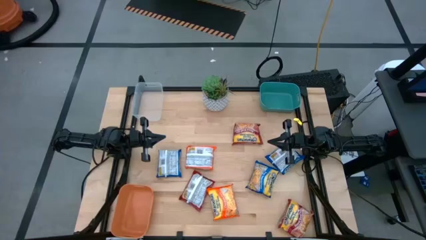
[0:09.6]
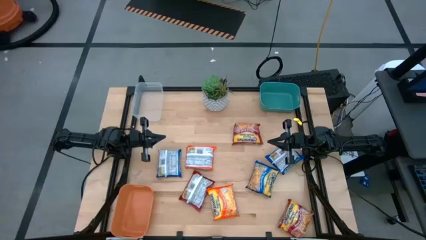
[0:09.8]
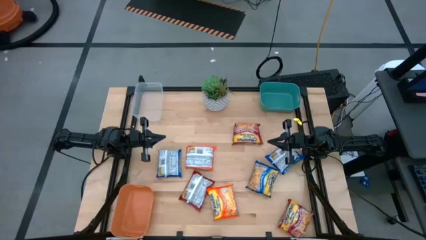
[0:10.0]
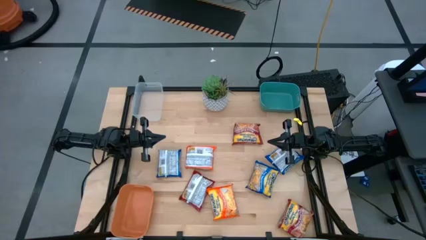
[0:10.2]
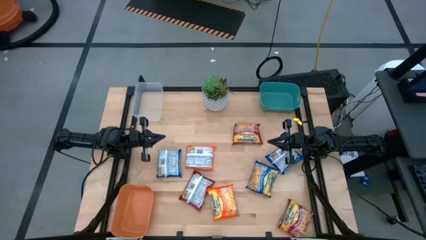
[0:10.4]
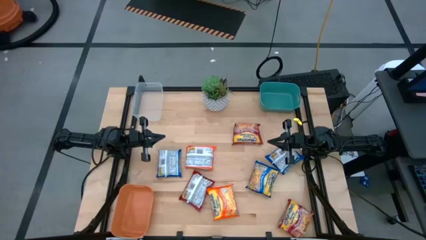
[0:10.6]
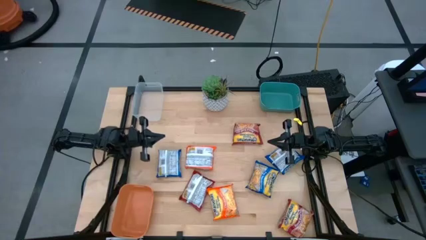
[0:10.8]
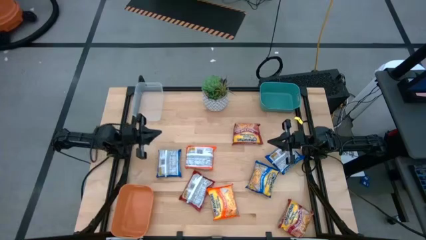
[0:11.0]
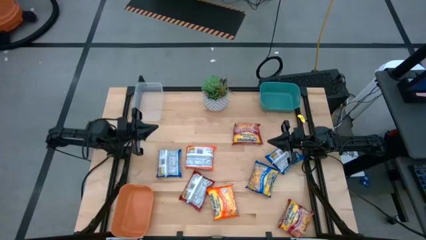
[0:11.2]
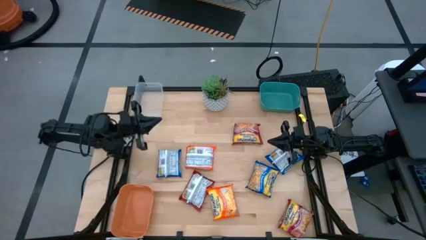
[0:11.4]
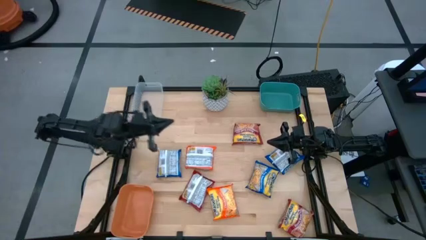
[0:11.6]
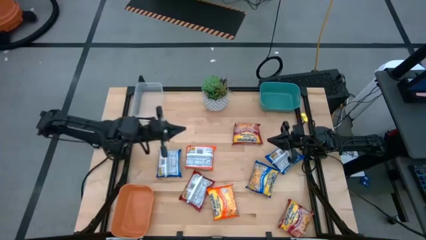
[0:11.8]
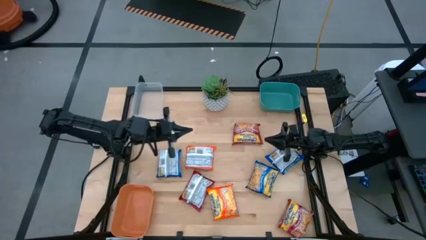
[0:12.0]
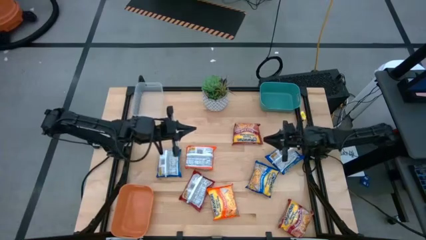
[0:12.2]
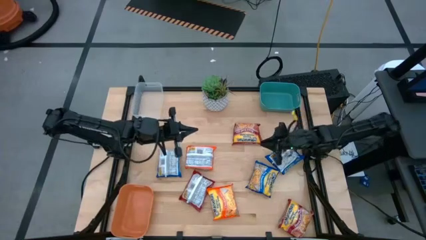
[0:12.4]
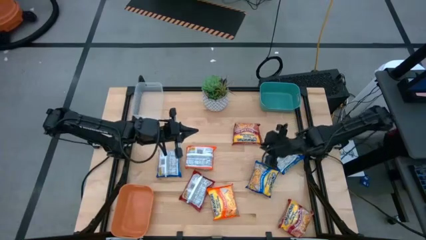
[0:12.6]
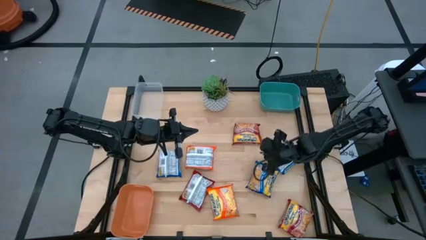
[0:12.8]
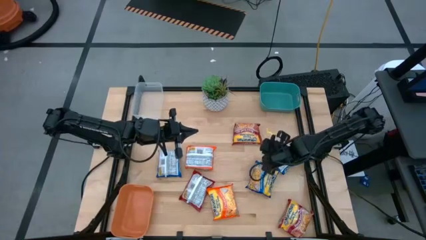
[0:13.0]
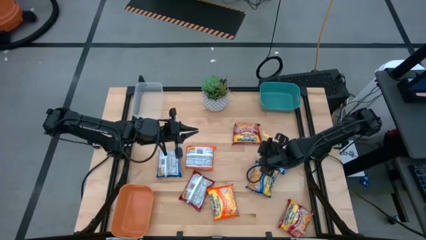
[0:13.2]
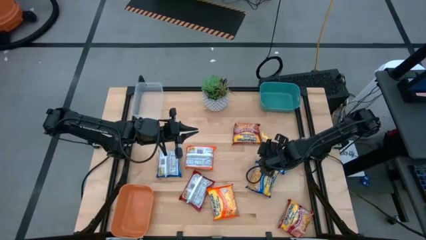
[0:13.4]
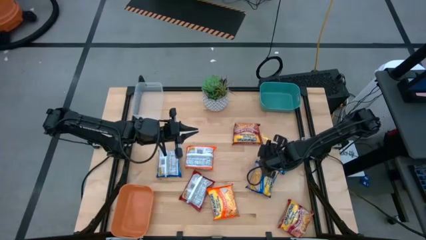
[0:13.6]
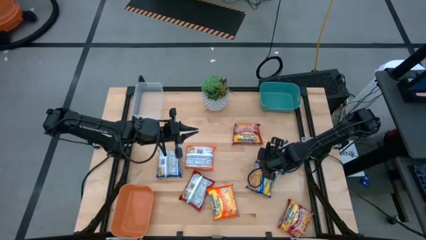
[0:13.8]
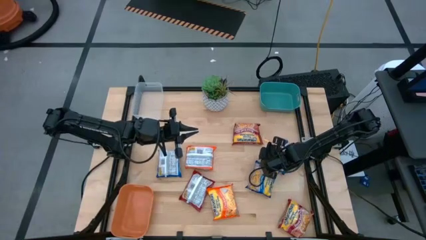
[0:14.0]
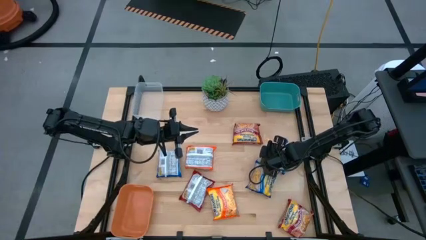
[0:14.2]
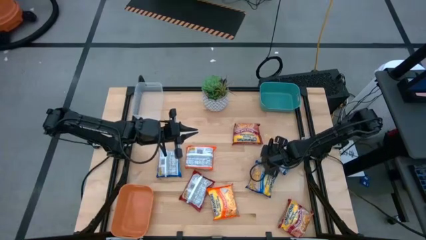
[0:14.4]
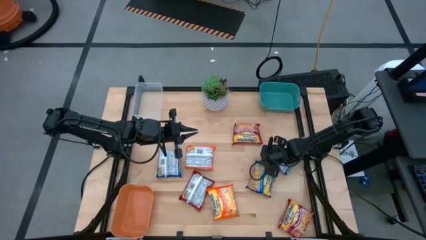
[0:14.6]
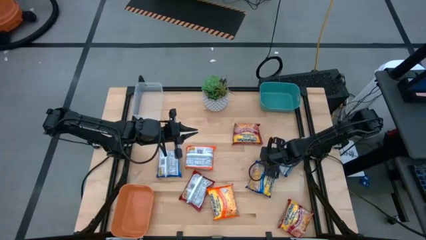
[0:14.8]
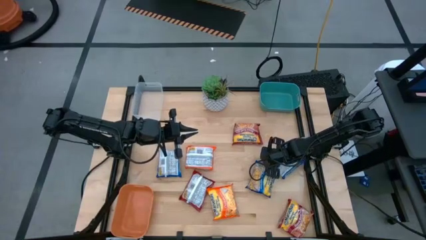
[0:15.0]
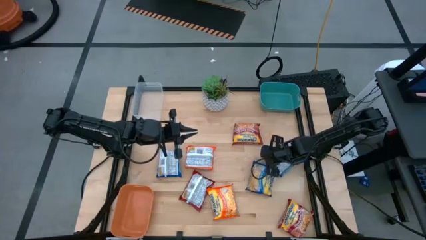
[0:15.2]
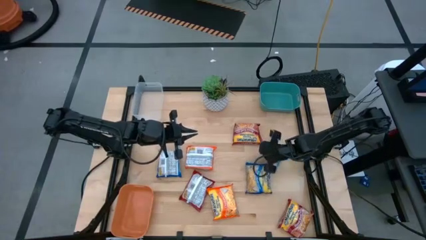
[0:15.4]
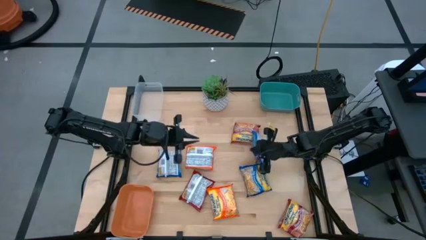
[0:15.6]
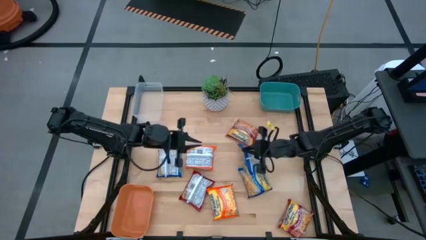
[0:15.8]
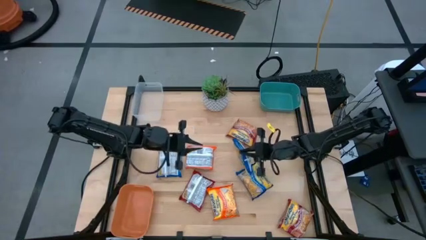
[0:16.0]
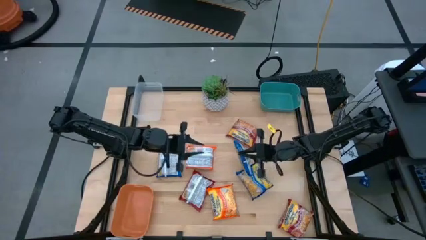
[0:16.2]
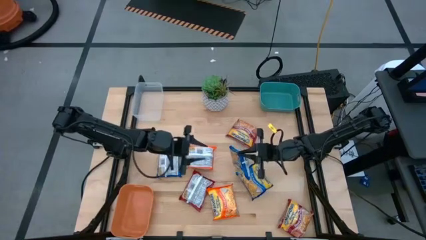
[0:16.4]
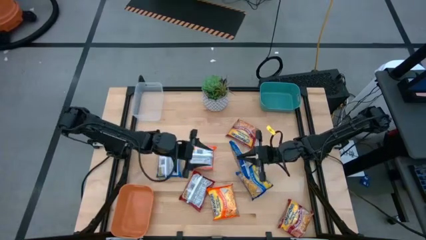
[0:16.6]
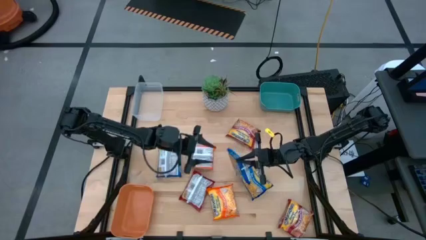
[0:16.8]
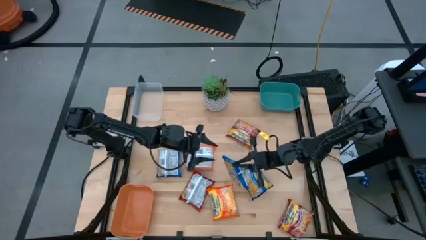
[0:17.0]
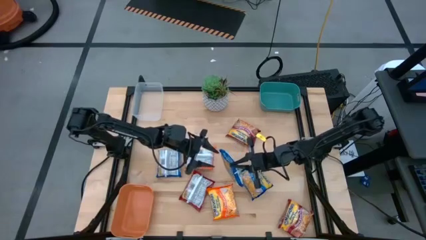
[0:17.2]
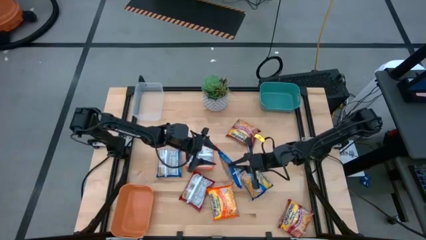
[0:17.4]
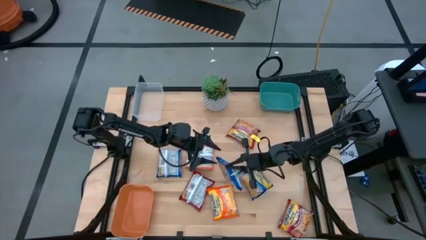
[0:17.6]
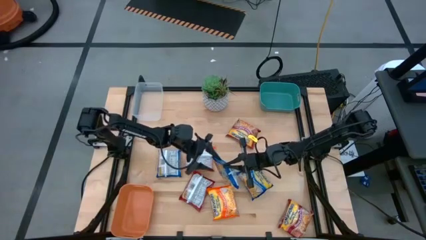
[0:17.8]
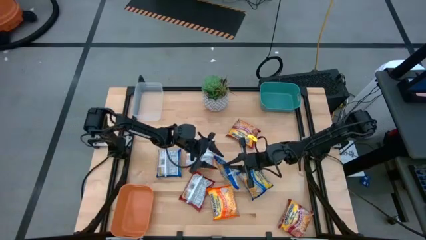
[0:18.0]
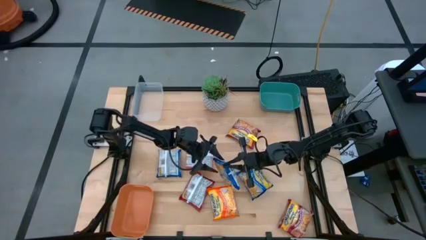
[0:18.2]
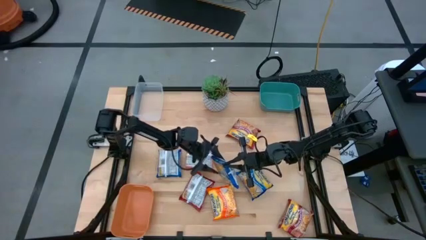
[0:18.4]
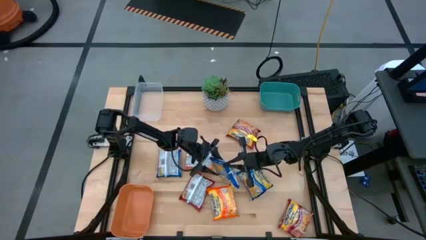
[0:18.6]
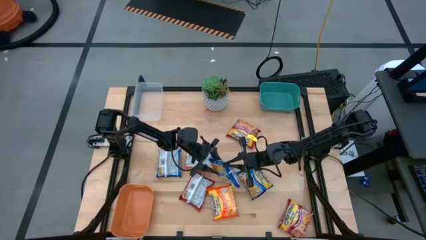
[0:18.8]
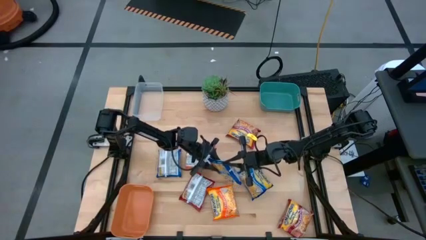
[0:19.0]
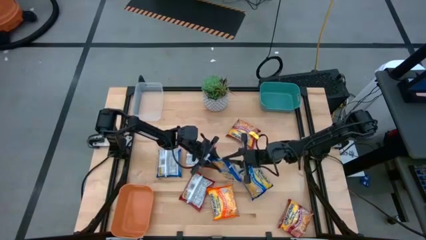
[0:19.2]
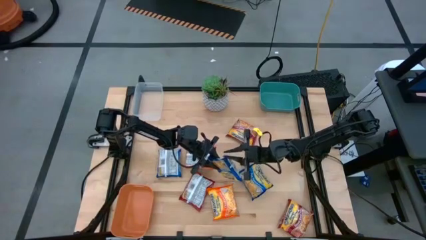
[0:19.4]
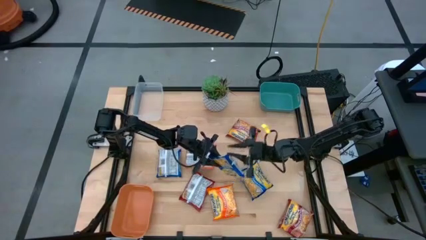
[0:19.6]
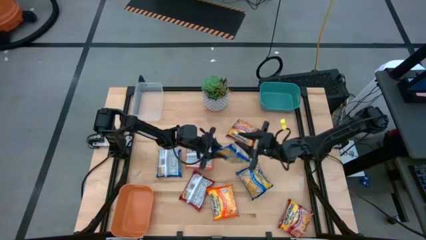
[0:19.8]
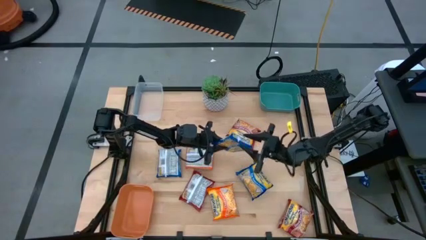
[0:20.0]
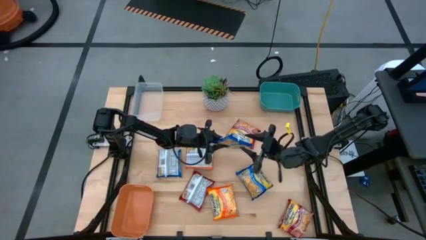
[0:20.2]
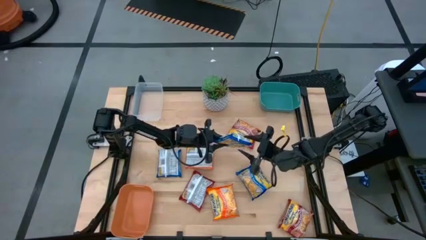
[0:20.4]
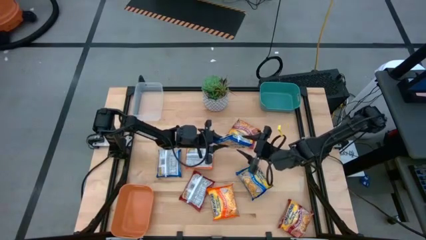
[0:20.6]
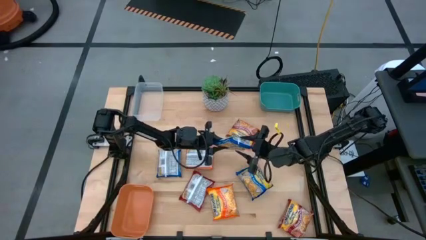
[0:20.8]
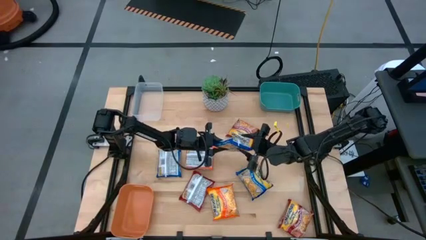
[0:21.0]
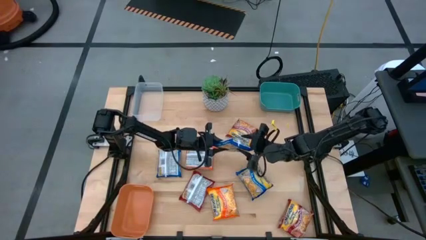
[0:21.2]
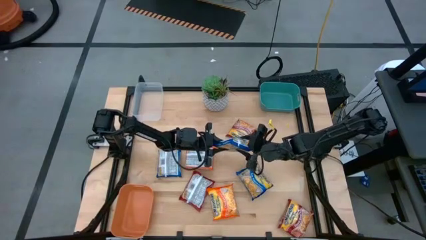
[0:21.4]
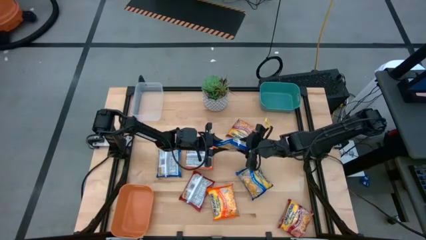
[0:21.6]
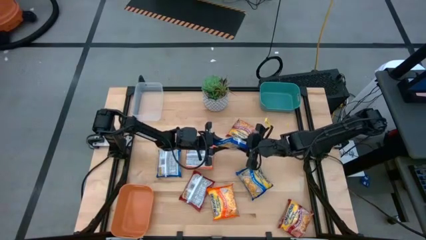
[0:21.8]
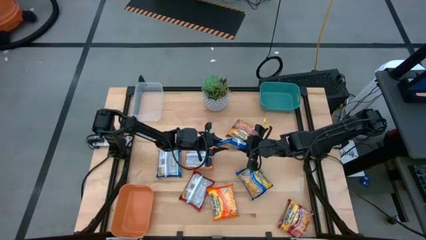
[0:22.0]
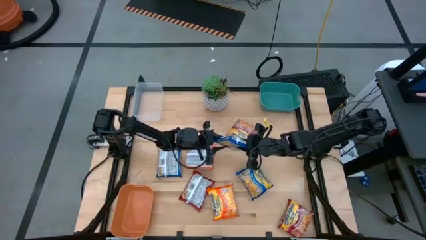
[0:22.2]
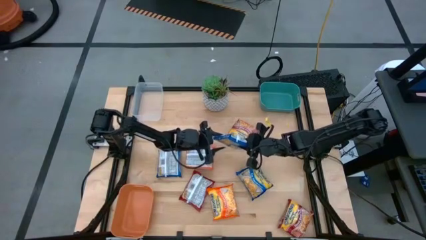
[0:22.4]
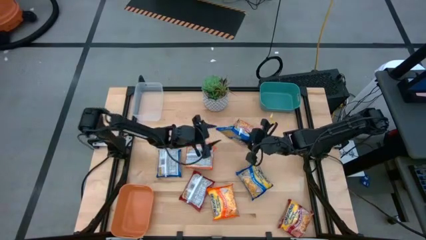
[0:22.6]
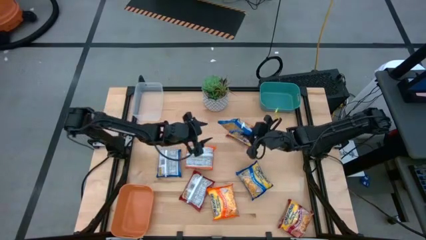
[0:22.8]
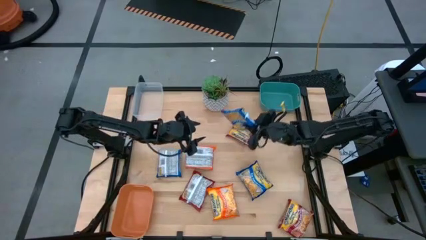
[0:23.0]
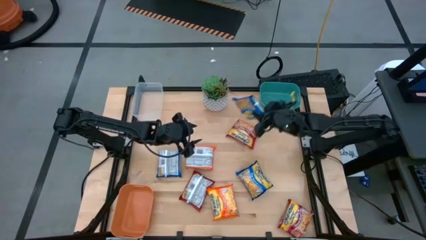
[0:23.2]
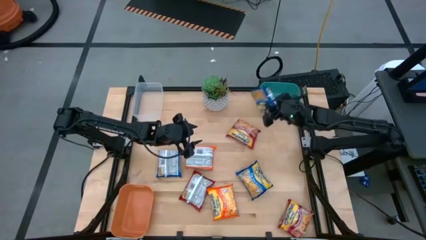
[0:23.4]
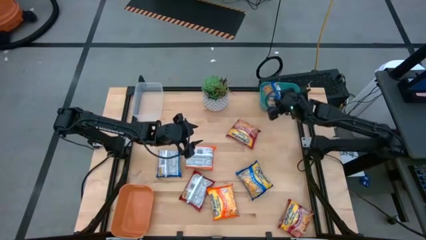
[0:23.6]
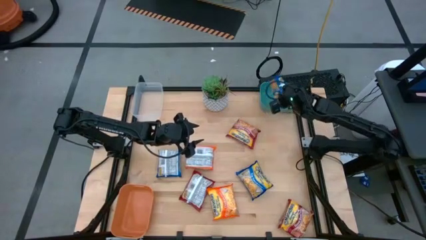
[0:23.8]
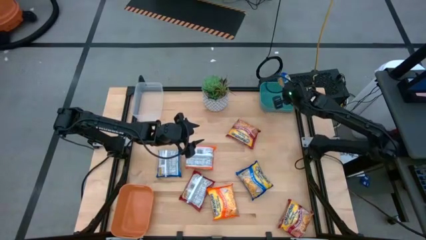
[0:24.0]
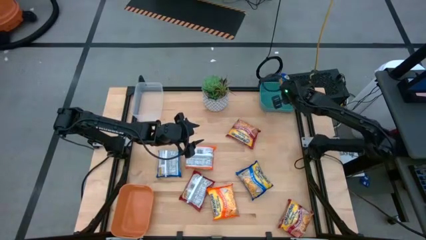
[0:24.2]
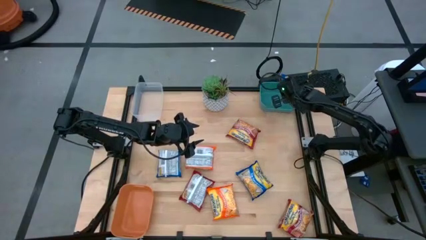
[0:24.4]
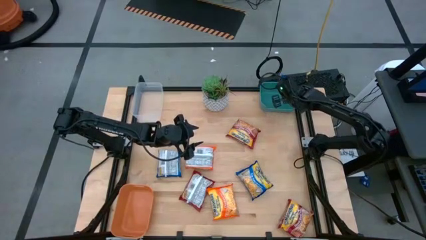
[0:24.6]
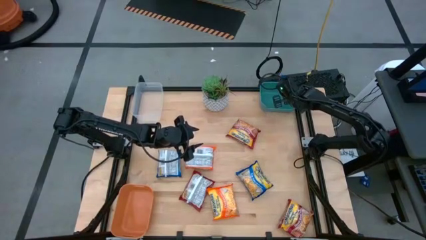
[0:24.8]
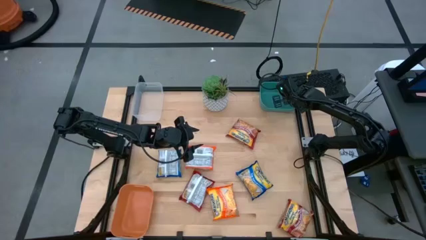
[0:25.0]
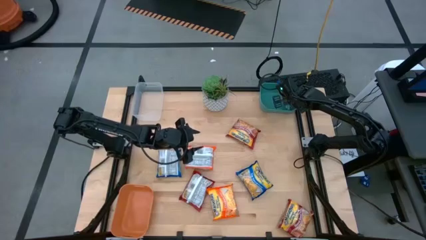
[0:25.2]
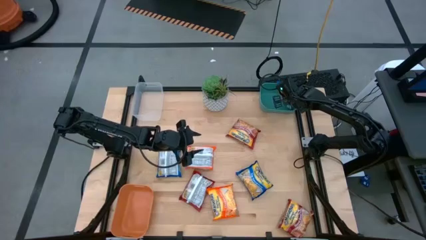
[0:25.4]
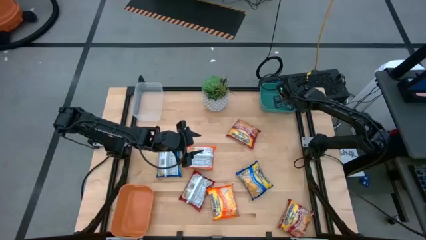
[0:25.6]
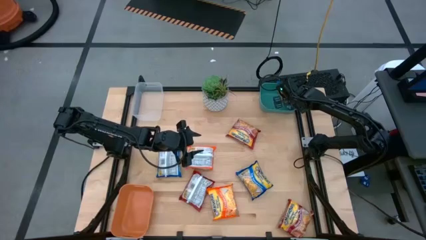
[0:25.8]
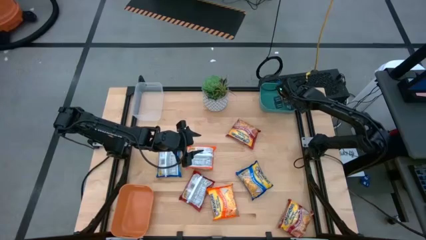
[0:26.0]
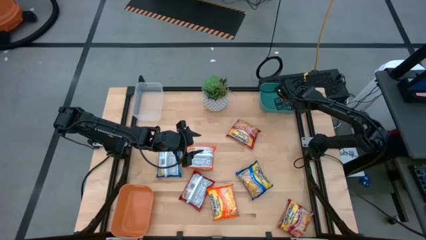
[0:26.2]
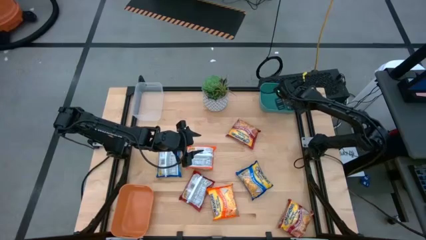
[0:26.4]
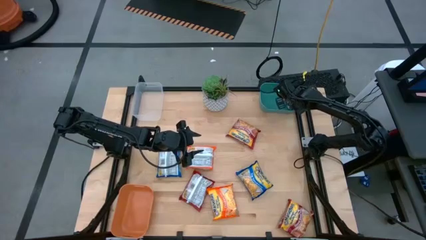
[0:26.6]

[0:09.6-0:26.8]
Task: Sort Maruchan noodles
Put the top right blue noodle pack into the green bin
